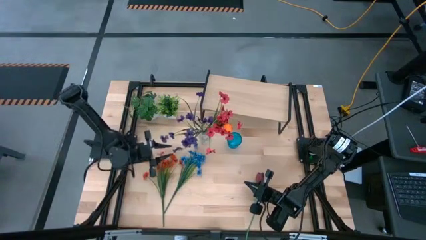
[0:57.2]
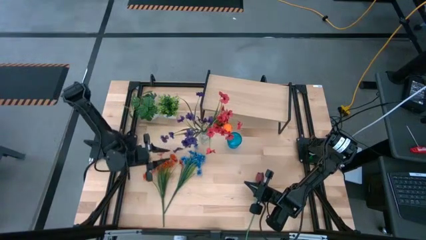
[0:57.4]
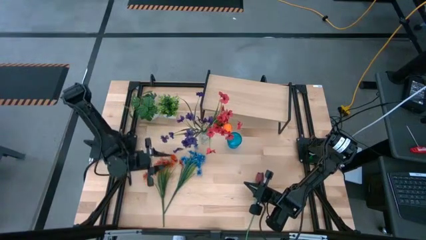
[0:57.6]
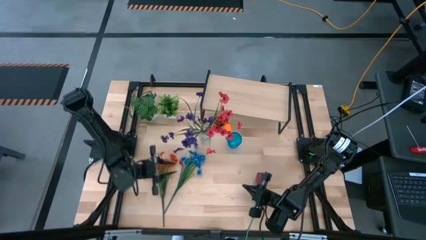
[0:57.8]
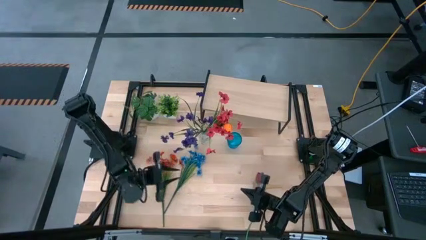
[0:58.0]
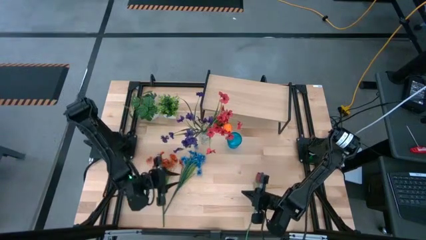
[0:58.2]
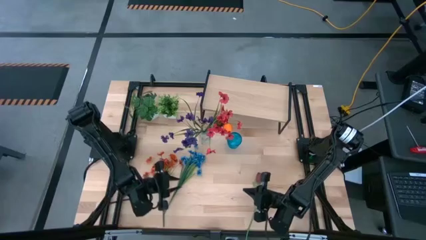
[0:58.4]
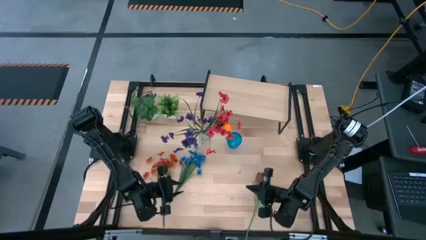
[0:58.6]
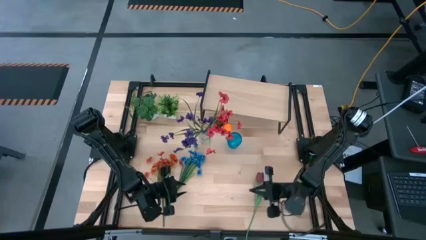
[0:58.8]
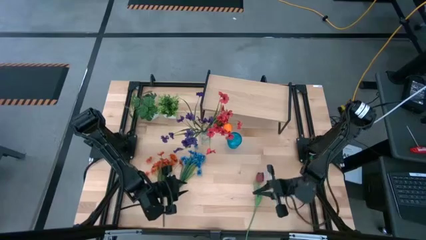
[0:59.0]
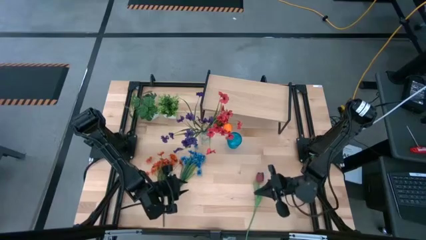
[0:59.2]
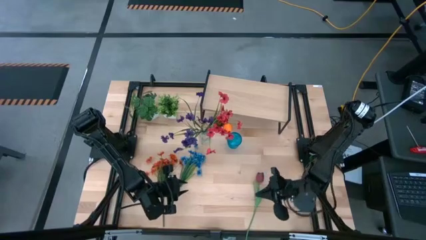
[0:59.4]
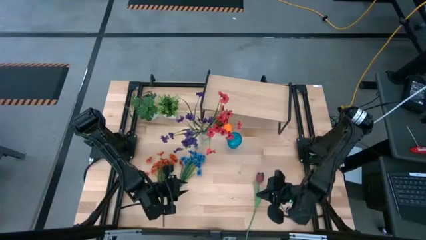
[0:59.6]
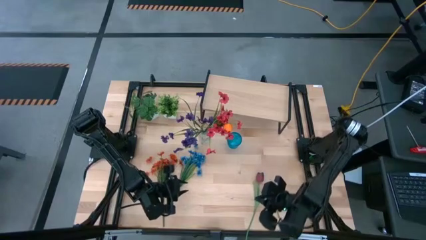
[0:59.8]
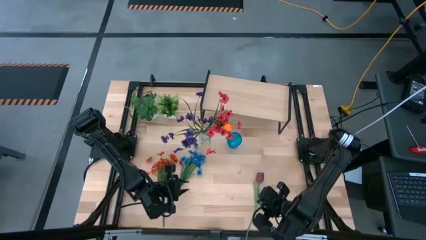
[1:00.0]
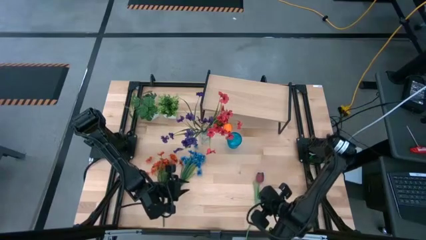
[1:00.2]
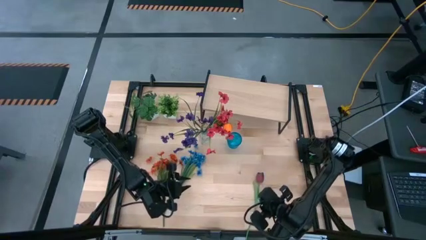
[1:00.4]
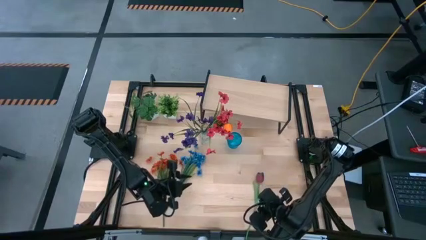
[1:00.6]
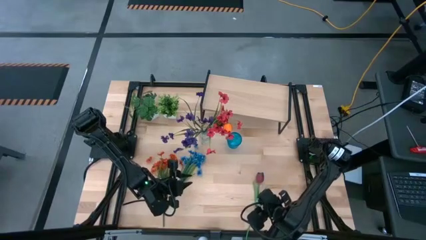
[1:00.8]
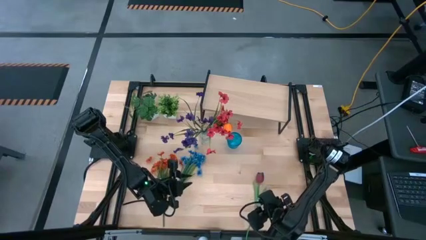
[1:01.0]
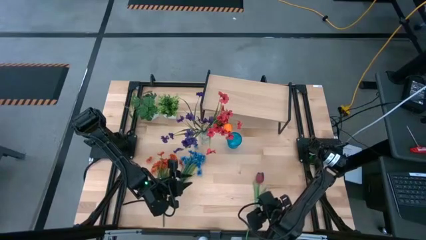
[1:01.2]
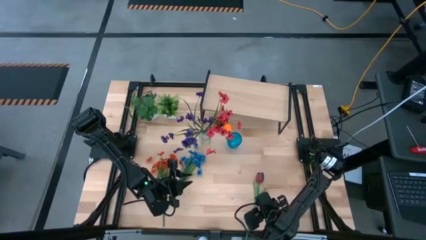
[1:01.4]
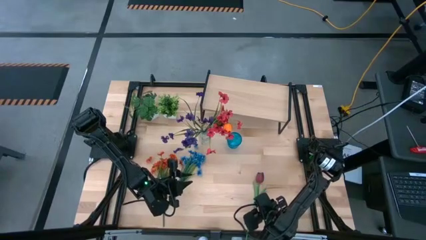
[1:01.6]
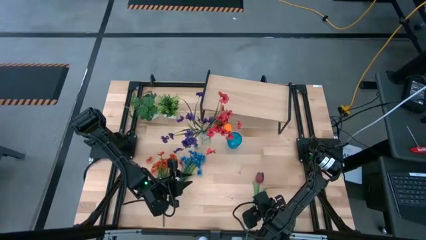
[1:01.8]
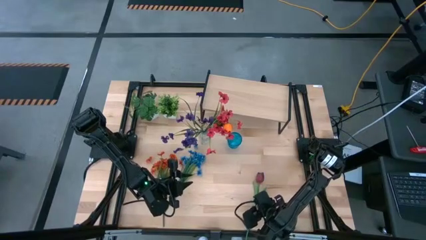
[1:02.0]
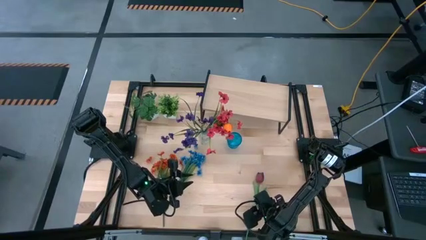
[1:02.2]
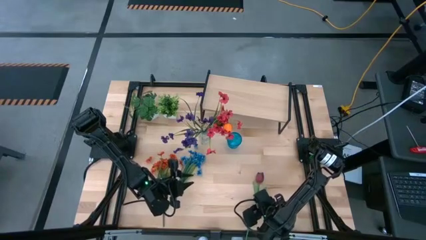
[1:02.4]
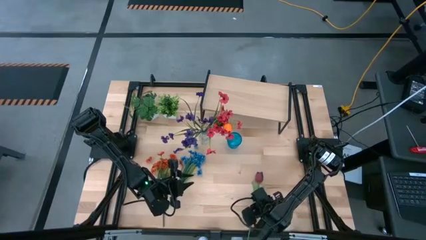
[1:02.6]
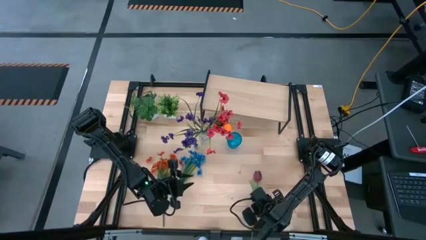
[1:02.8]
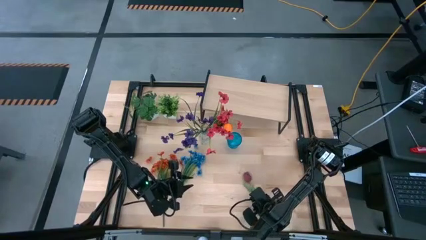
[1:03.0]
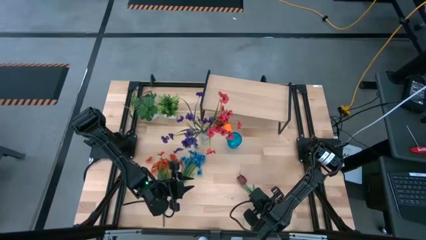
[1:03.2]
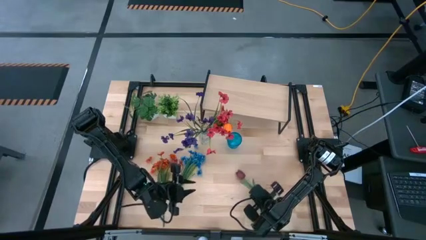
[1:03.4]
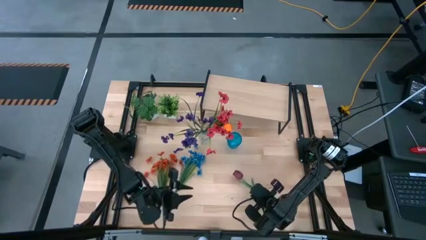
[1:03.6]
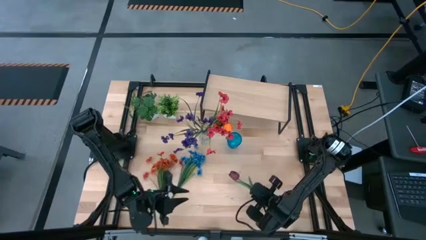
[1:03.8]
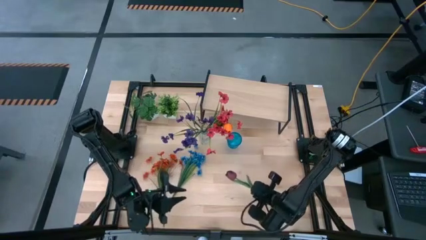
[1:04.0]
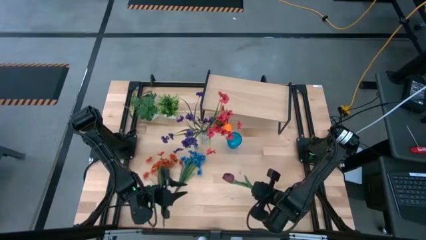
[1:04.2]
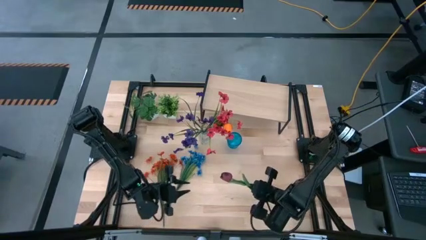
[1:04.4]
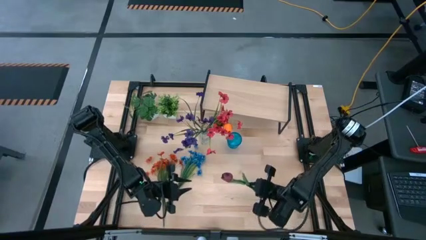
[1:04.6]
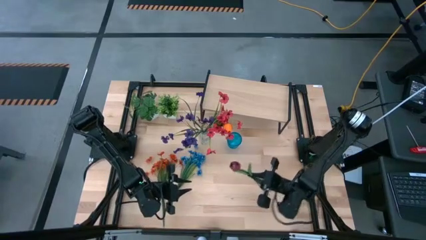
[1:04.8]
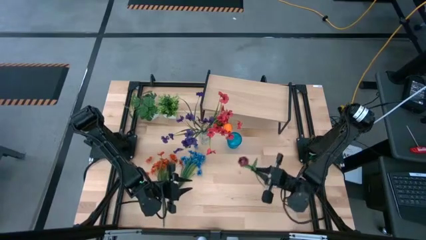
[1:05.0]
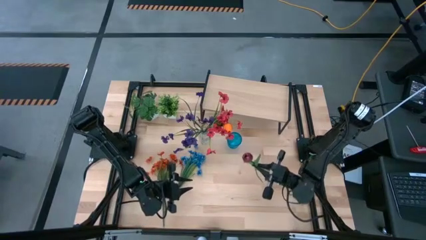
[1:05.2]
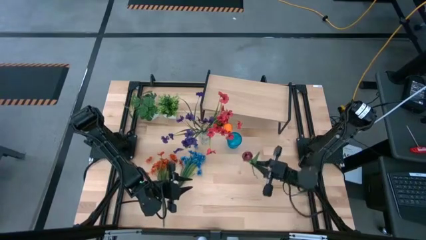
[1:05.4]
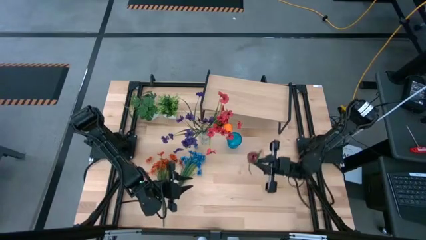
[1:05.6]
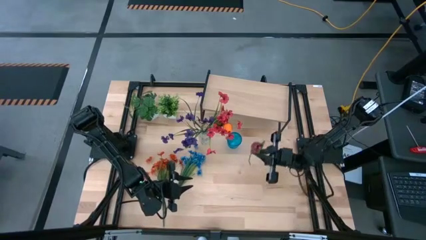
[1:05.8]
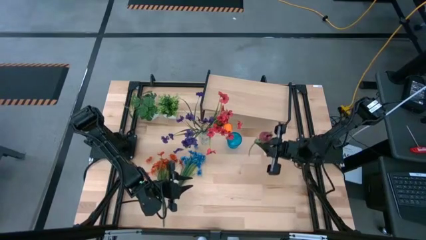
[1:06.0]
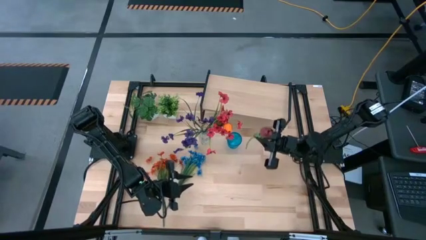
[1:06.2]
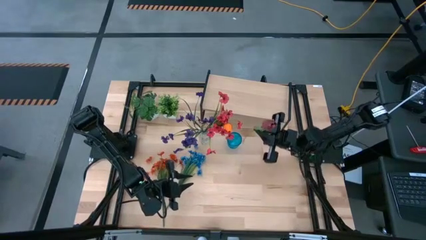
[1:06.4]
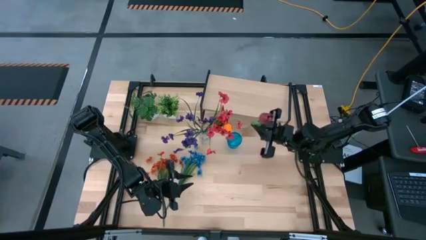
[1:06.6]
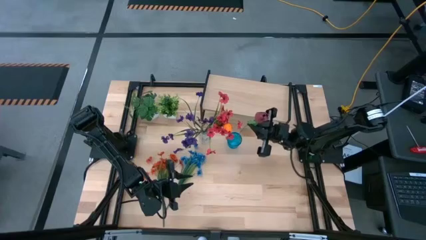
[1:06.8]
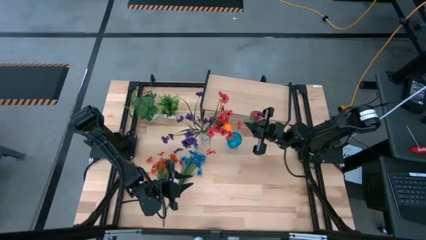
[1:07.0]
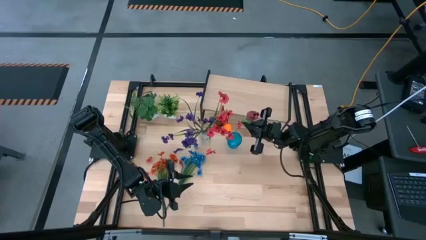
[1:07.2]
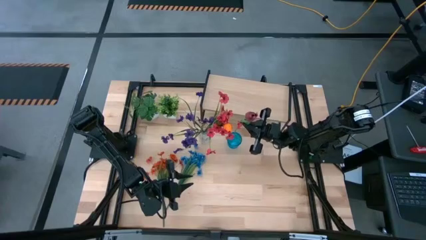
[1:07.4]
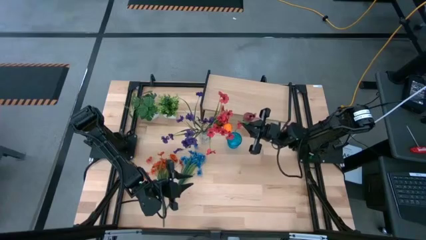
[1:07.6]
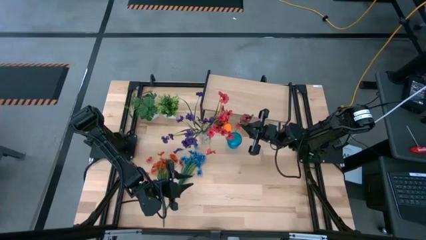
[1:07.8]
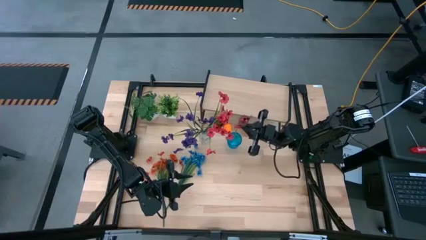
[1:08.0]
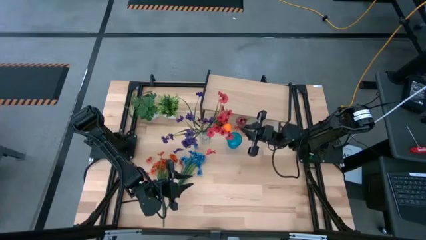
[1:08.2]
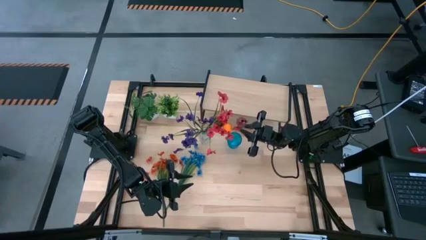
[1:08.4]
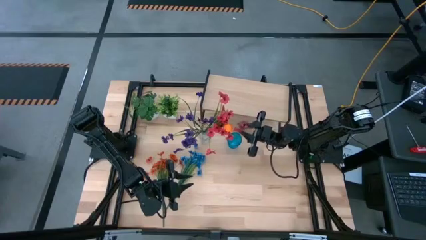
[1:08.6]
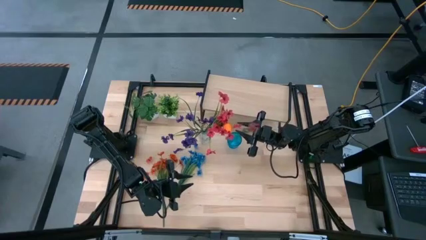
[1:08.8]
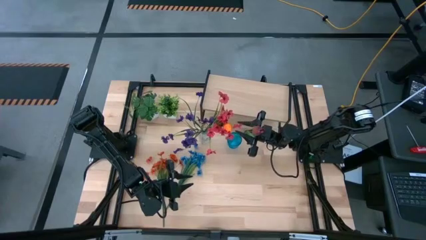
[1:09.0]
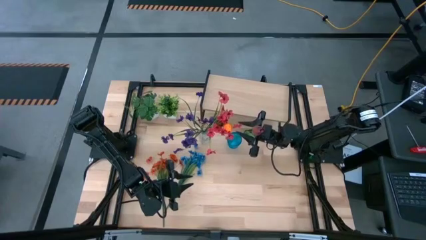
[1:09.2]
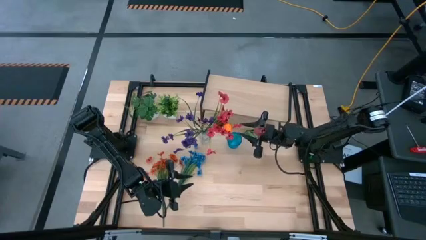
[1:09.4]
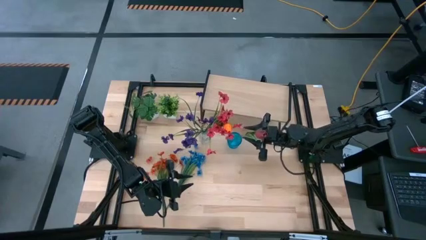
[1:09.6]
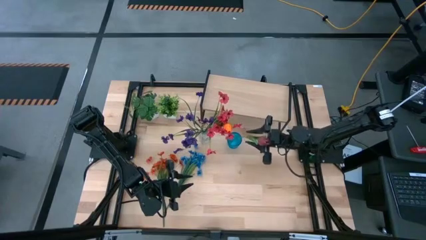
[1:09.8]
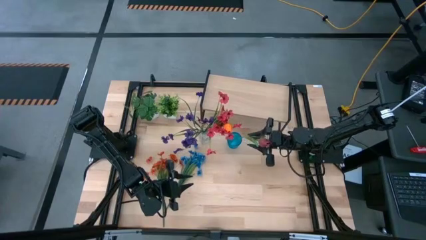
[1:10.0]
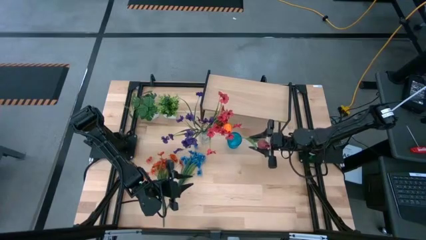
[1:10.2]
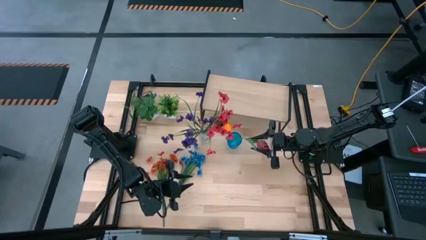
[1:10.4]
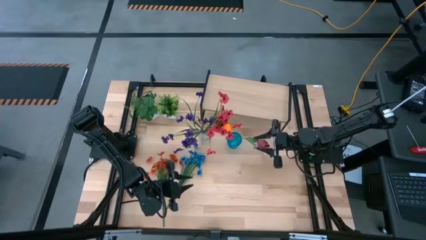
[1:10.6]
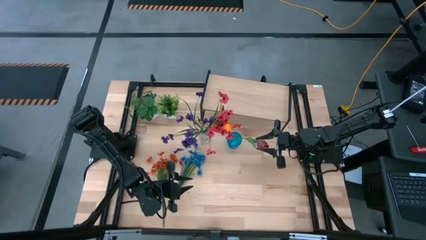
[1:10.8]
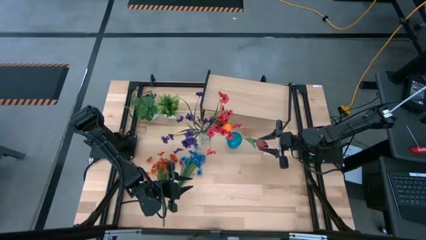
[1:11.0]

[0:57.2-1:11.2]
Task: Pick and place flowers into a vace then onto a shelf
Put the red flower into the blue vase
